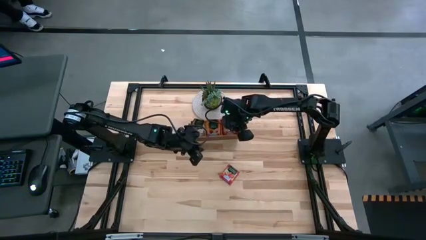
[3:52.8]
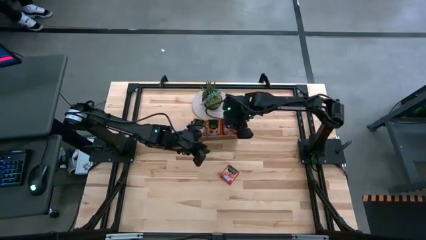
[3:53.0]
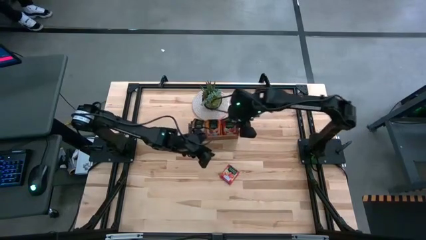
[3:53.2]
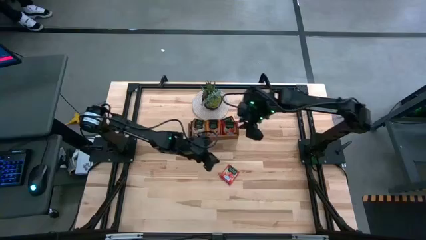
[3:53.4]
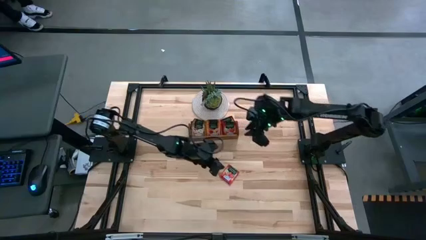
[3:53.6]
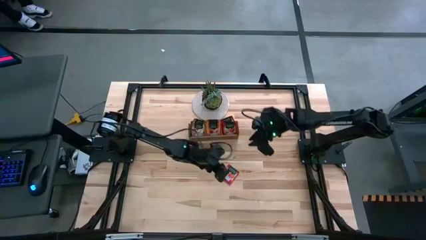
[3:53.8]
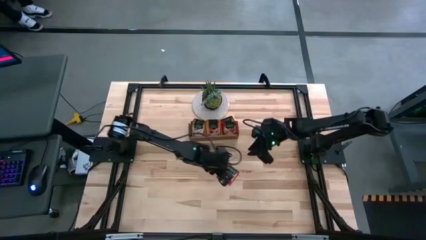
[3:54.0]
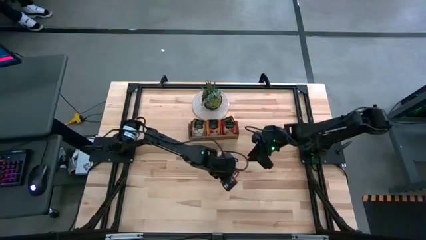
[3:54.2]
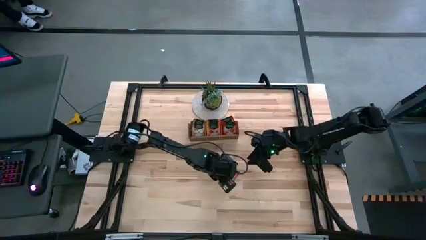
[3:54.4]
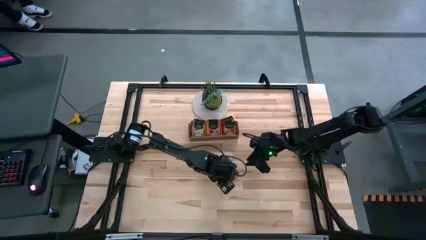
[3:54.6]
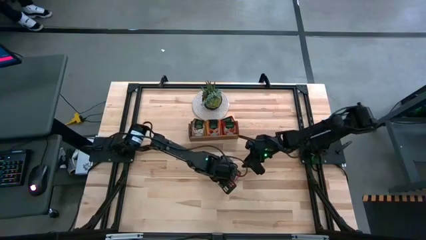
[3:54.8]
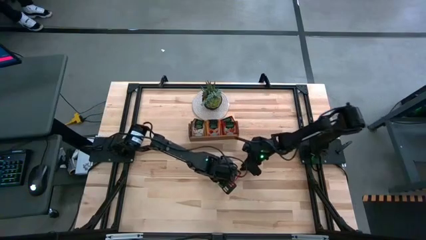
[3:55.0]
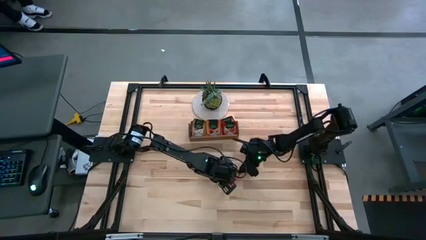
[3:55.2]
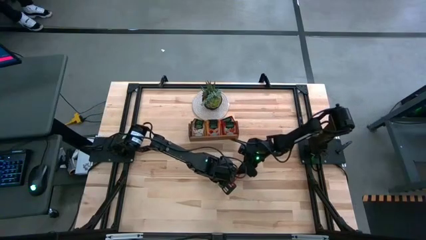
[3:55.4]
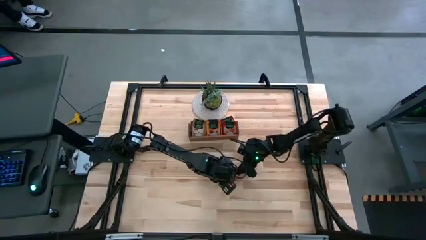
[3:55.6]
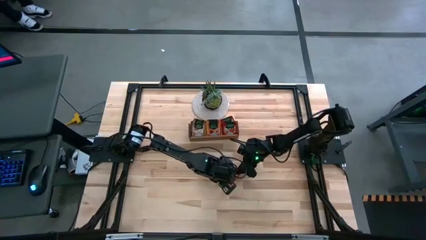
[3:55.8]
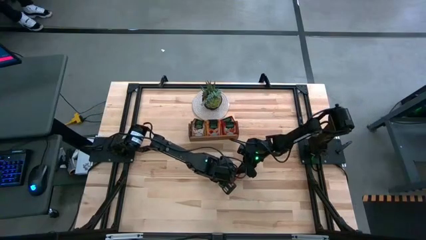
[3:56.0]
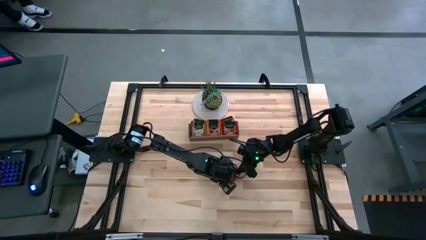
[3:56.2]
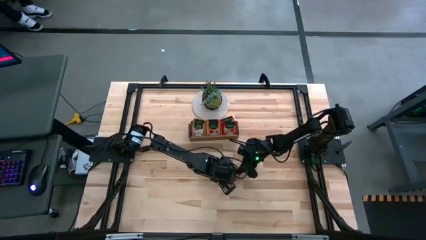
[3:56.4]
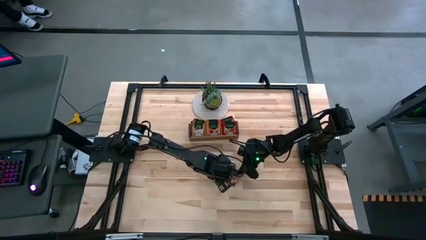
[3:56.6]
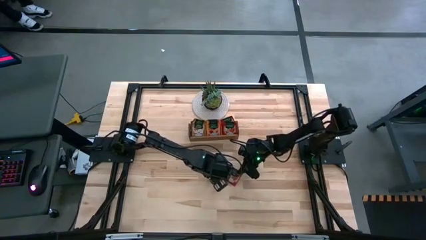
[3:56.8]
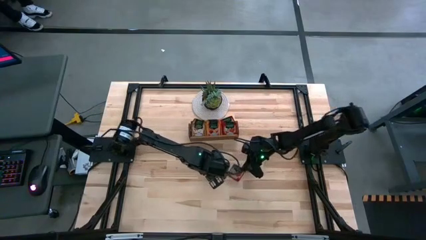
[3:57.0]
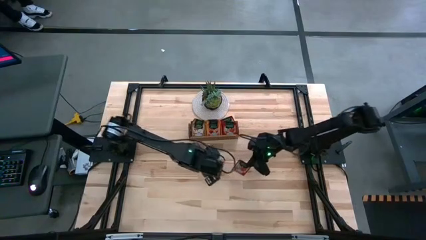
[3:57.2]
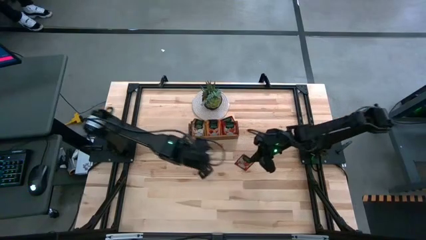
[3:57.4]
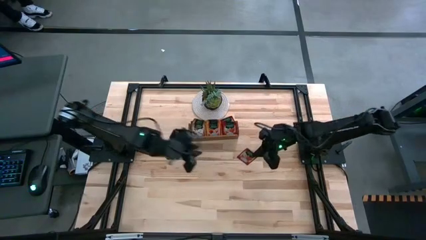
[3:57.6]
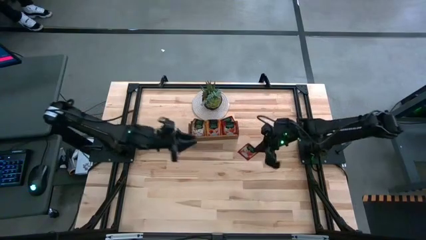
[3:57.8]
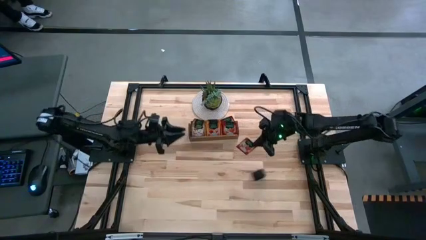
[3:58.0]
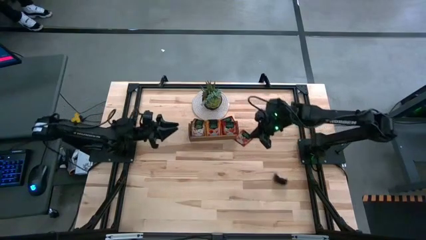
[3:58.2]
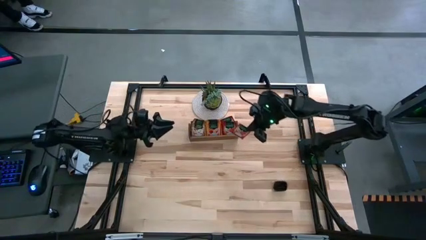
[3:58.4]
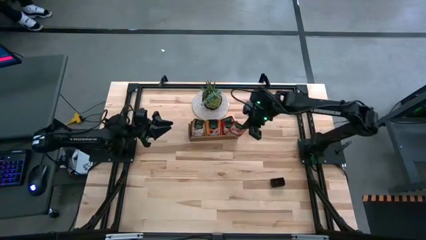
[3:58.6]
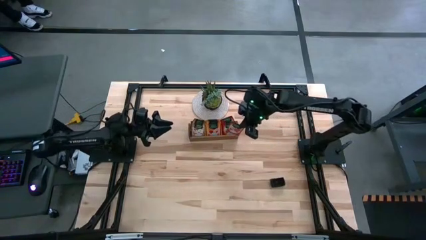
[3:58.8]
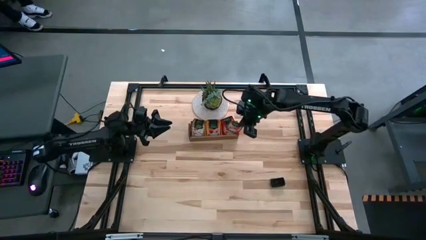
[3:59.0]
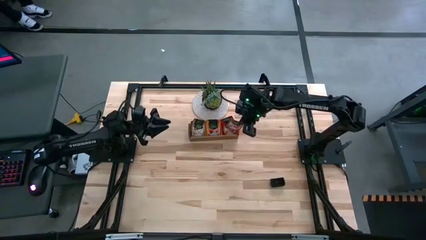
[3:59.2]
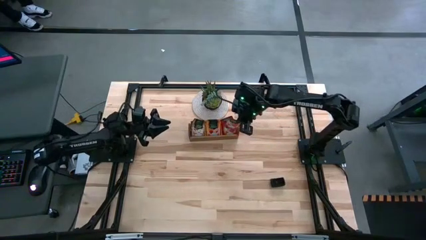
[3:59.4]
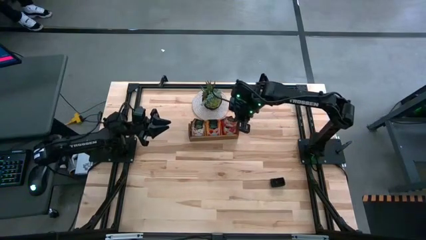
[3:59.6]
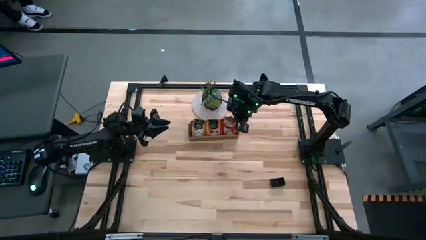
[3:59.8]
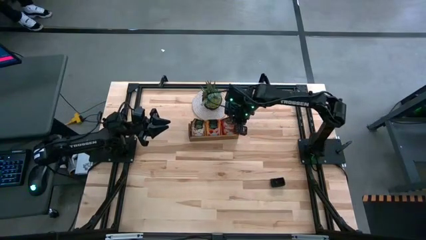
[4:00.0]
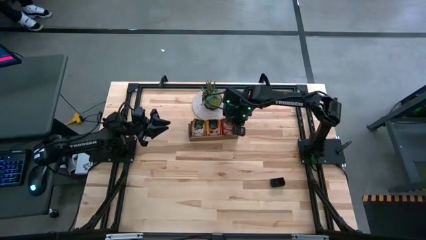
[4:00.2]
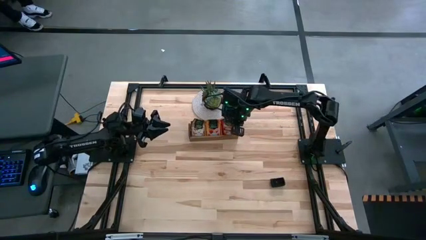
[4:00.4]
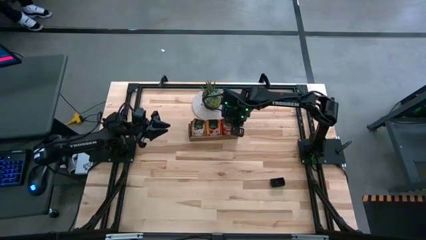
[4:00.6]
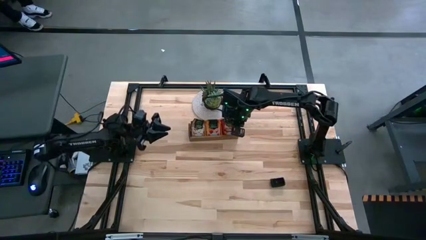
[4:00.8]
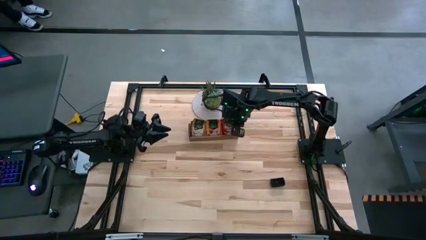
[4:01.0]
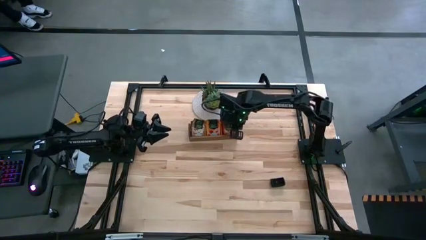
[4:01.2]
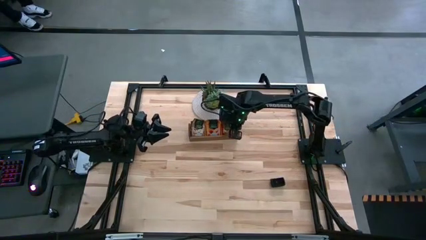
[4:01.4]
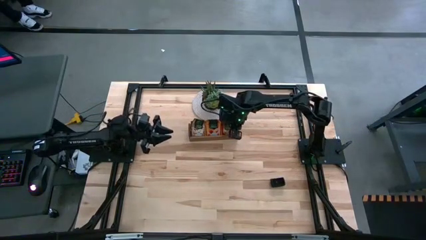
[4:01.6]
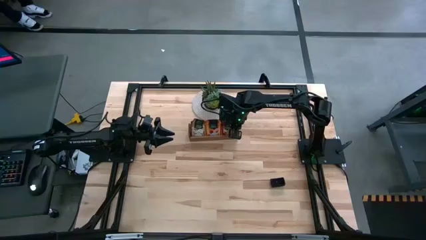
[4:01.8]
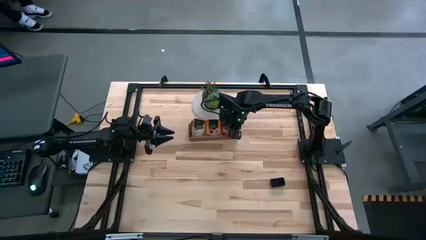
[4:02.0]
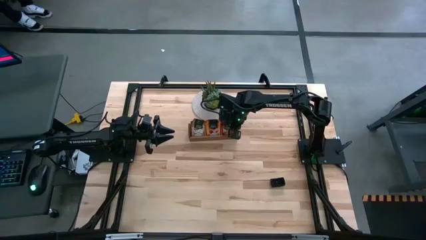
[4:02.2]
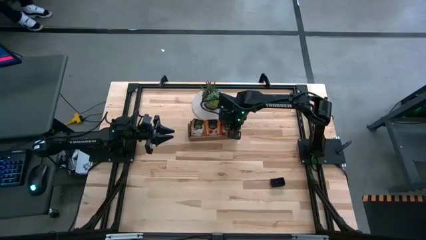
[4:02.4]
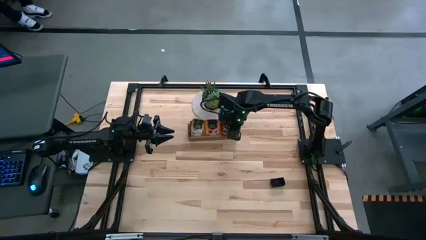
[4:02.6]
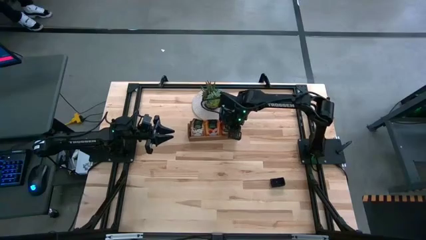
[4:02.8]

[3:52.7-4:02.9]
Task: Pick & Place Tea
Put the red tea bag into the right section of the wooden organizer

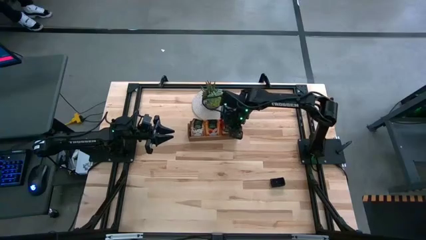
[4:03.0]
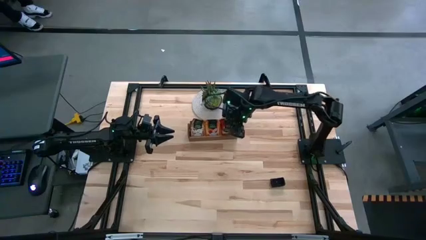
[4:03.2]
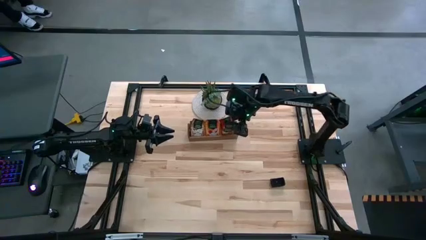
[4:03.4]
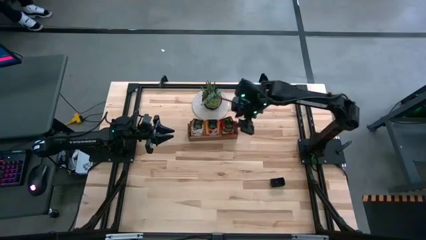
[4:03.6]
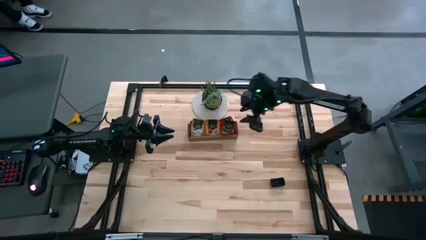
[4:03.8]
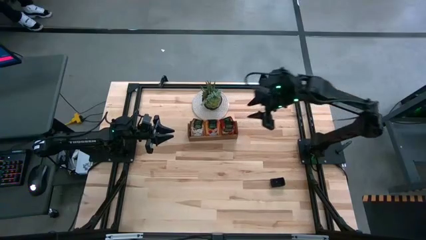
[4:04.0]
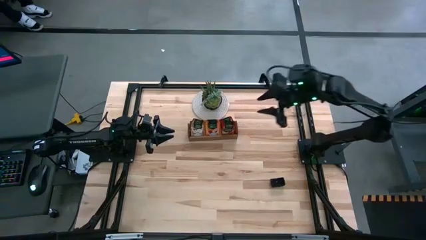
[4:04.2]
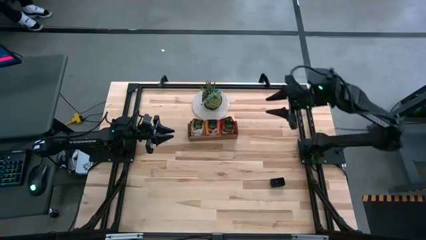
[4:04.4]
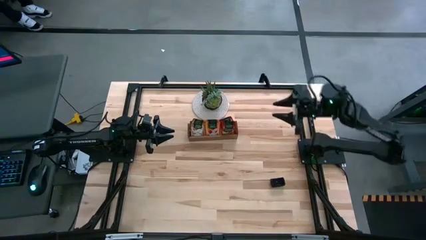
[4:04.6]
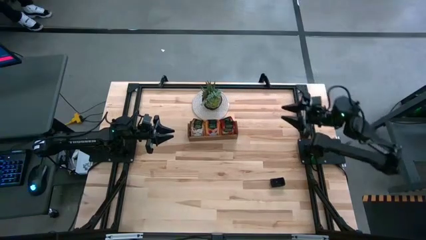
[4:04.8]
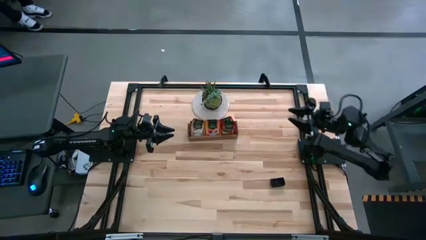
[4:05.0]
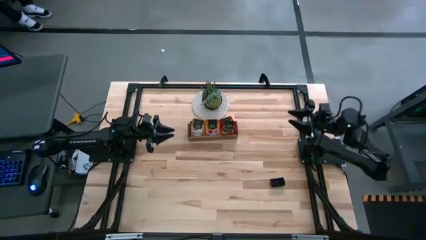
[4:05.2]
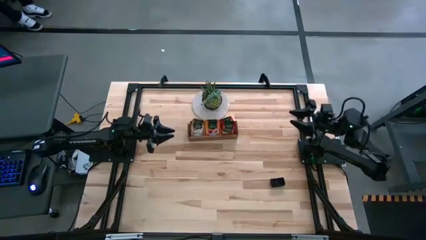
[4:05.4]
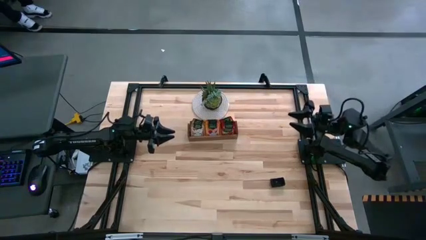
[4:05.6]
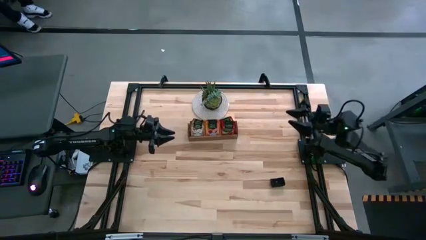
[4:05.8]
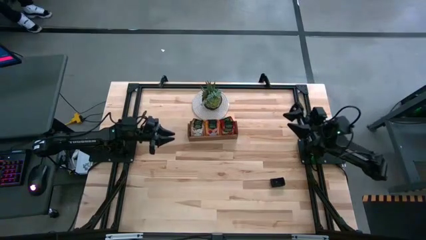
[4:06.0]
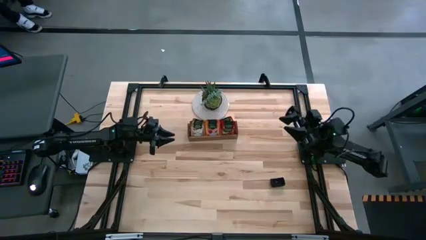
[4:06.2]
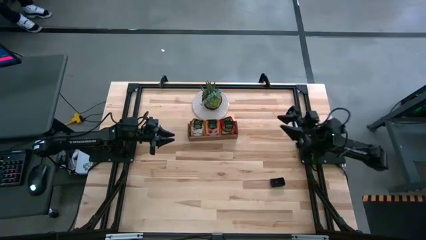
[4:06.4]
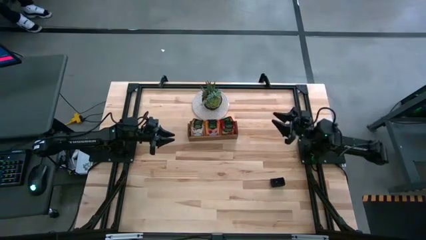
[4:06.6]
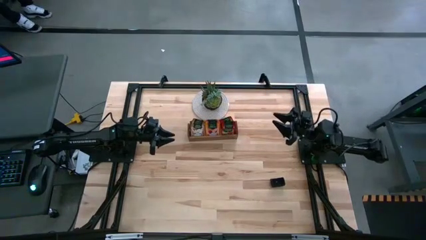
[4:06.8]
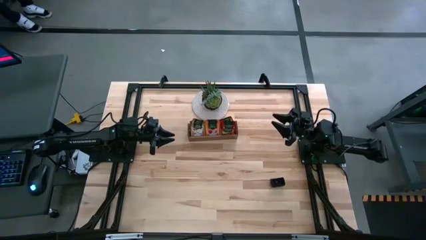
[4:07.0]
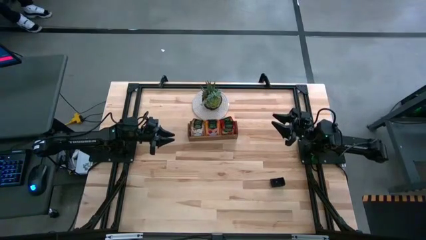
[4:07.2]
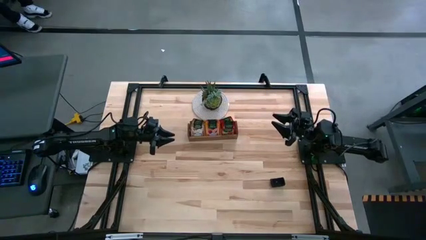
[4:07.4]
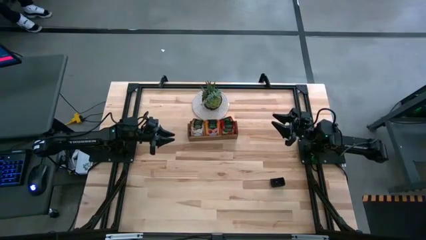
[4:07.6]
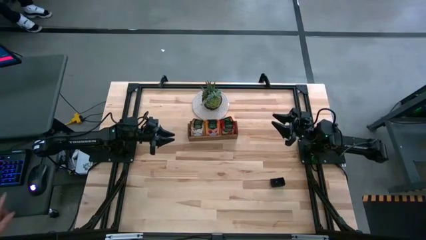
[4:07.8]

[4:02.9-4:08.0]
Return to Home Position

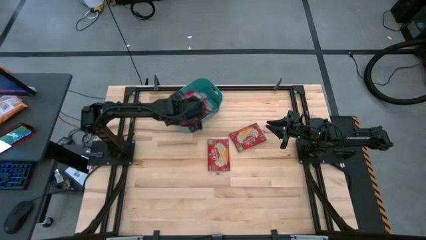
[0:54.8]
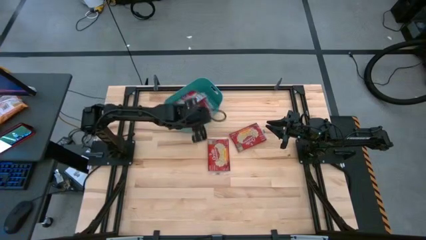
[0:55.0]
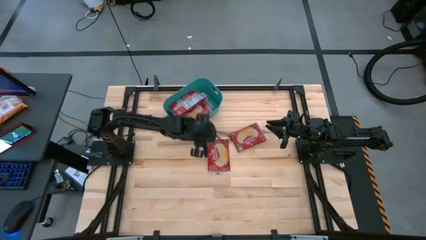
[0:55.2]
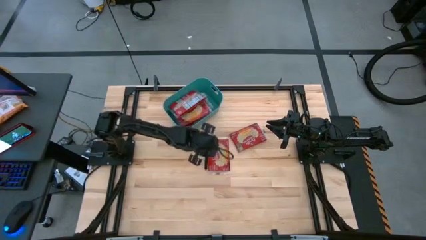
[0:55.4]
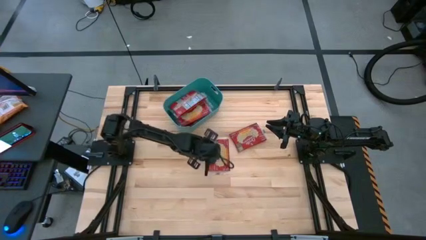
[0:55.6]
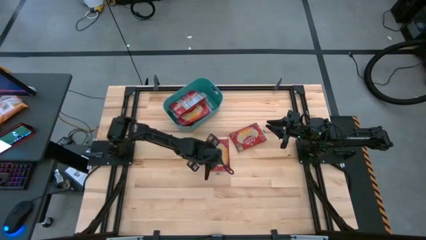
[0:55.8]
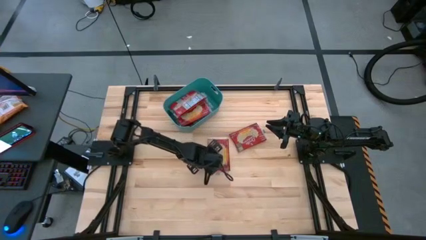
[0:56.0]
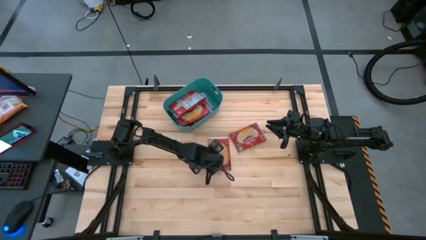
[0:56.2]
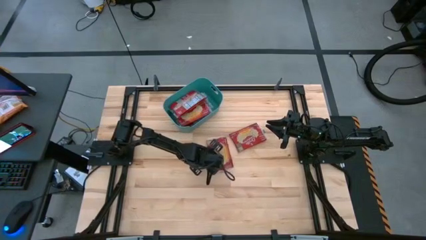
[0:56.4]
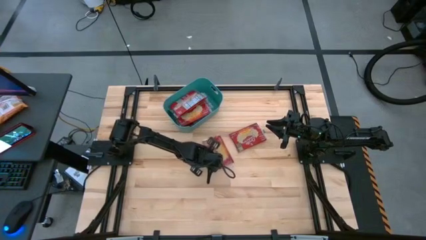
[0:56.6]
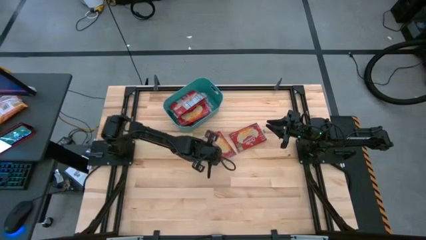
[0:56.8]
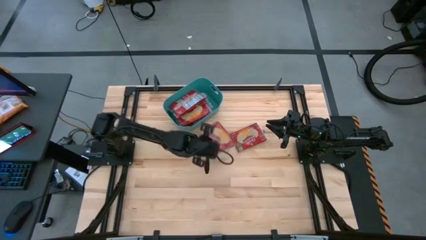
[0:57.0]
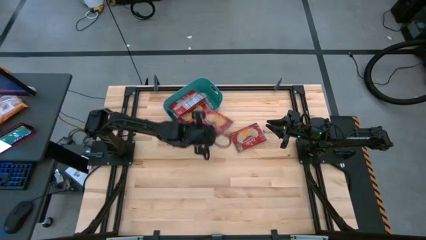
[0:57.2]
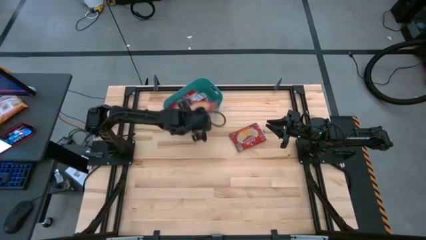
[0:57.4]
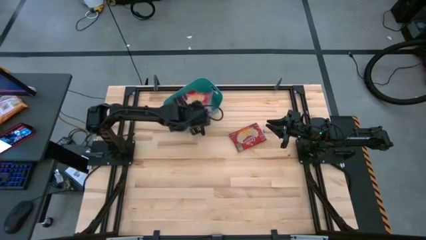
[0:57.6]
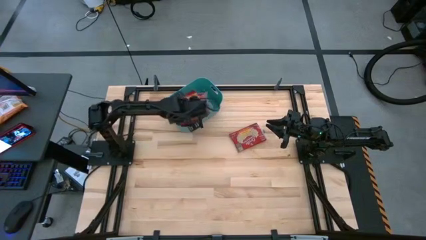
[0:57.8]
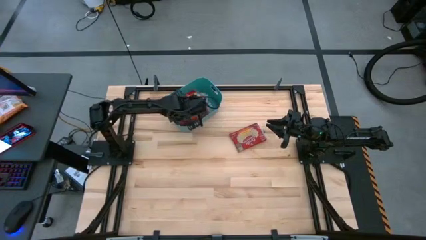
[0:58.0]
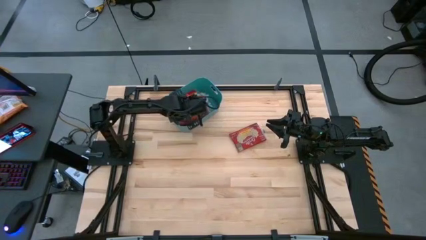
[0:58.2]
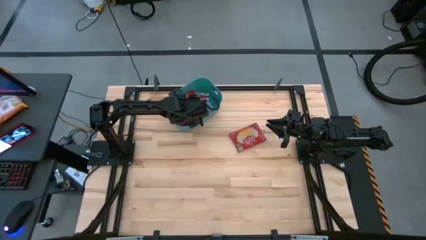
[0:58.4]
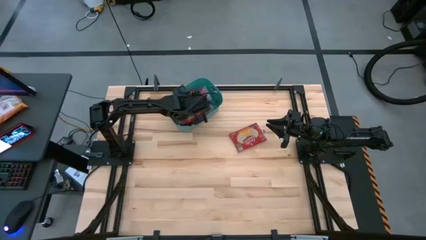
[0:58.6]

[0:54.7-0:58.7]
Task: Sort popcorn bags into baskets
Put the red popcorn bag into the green bin
